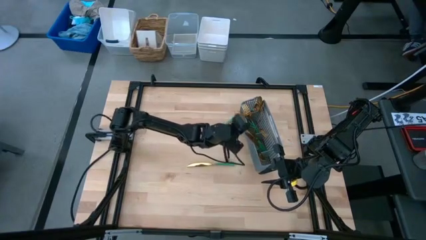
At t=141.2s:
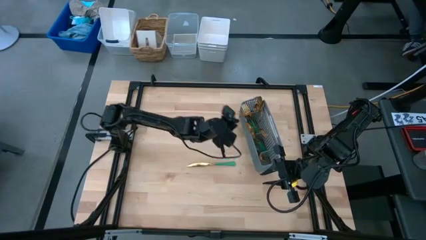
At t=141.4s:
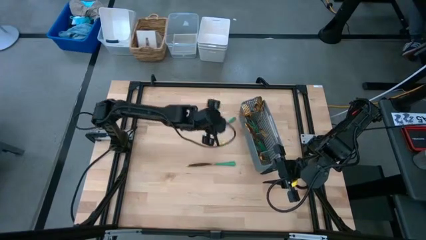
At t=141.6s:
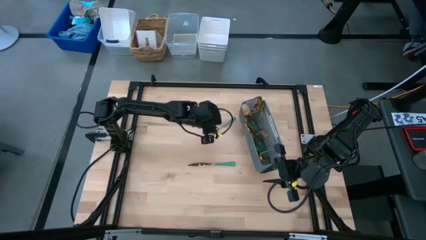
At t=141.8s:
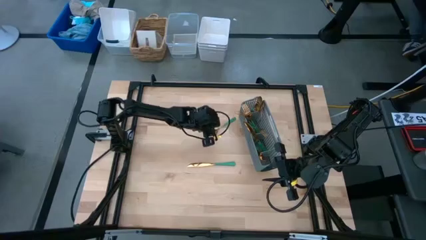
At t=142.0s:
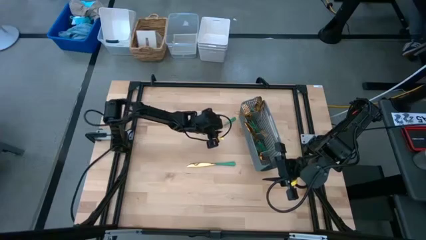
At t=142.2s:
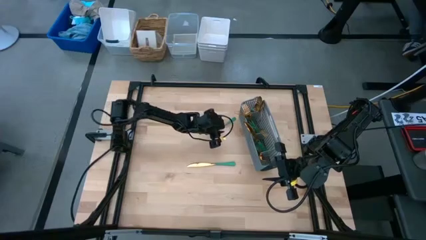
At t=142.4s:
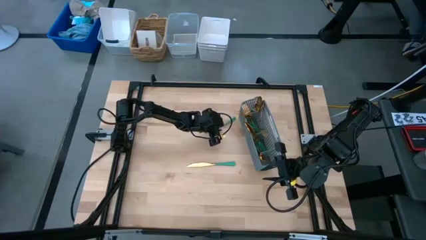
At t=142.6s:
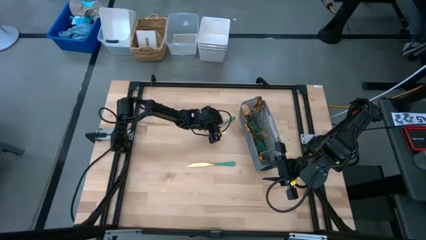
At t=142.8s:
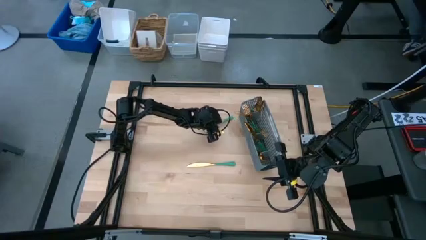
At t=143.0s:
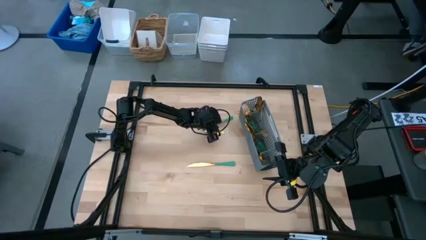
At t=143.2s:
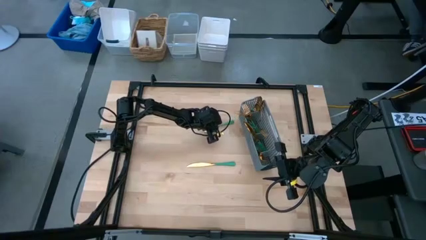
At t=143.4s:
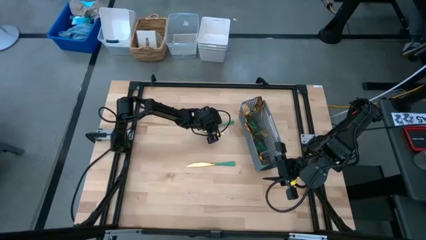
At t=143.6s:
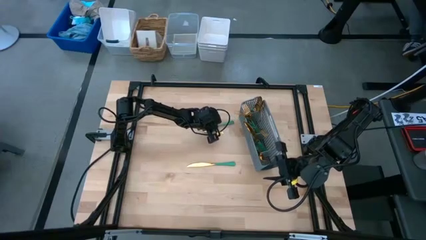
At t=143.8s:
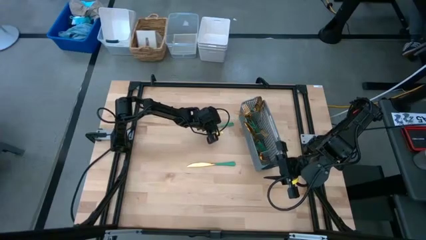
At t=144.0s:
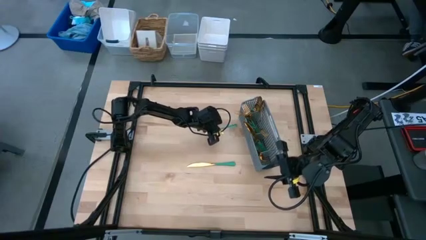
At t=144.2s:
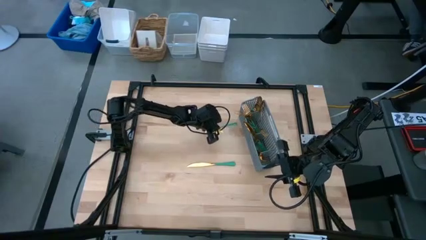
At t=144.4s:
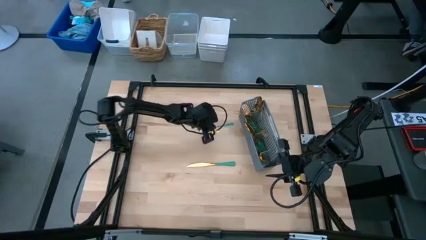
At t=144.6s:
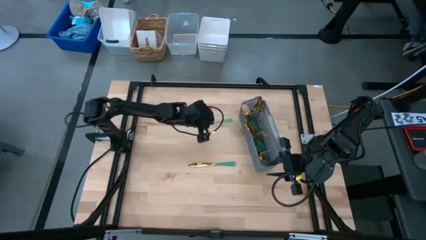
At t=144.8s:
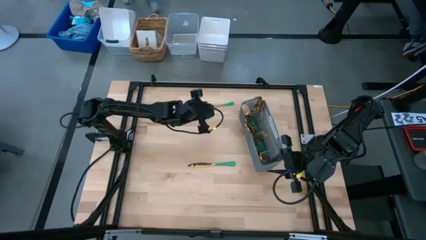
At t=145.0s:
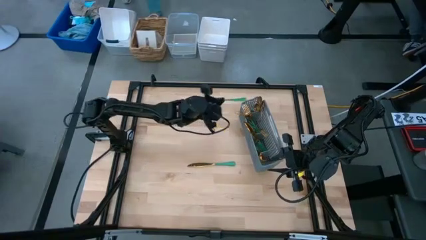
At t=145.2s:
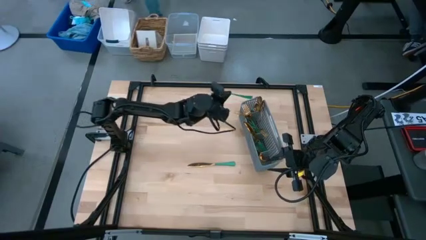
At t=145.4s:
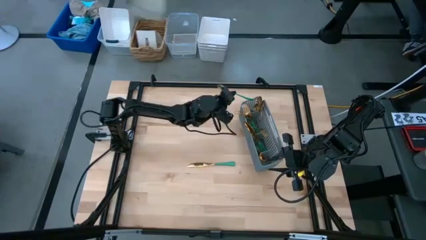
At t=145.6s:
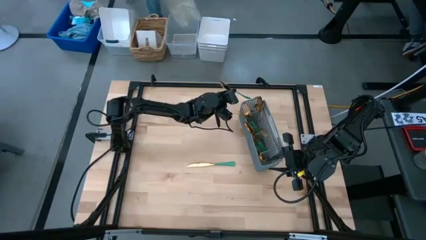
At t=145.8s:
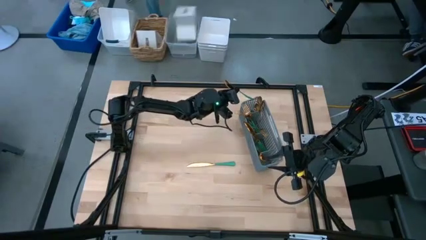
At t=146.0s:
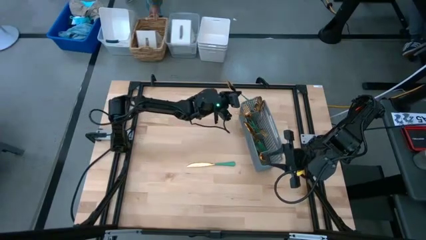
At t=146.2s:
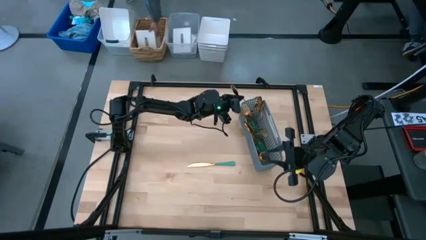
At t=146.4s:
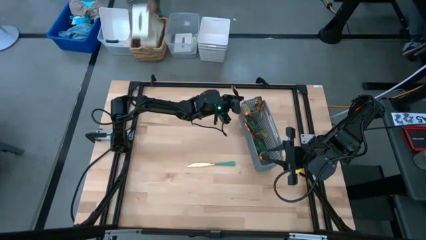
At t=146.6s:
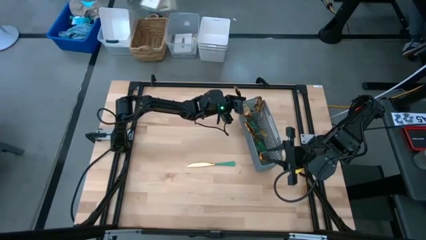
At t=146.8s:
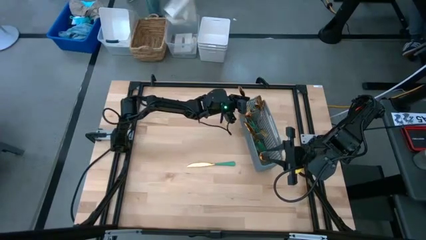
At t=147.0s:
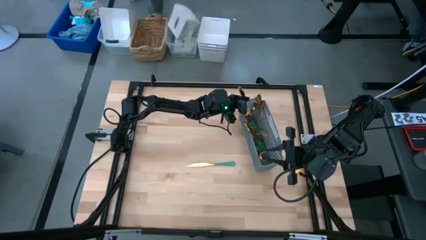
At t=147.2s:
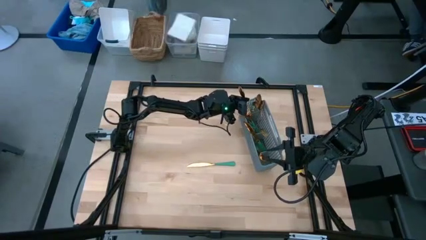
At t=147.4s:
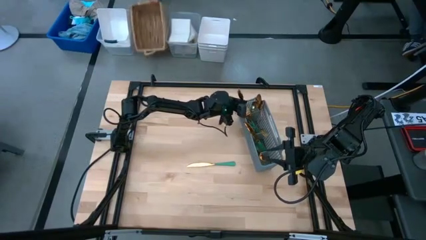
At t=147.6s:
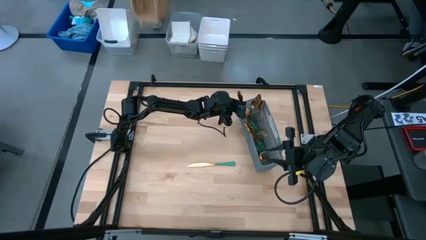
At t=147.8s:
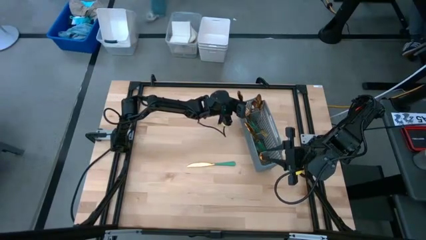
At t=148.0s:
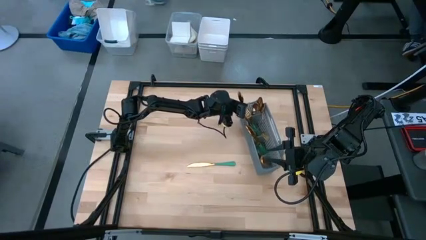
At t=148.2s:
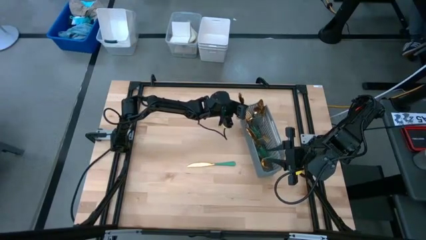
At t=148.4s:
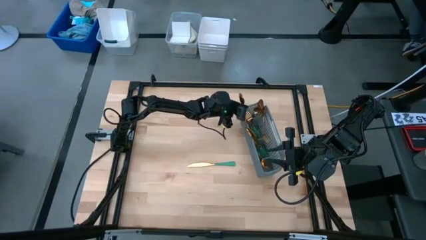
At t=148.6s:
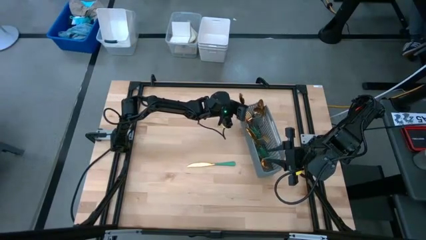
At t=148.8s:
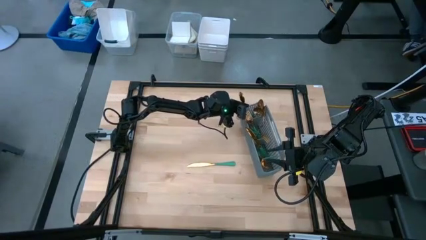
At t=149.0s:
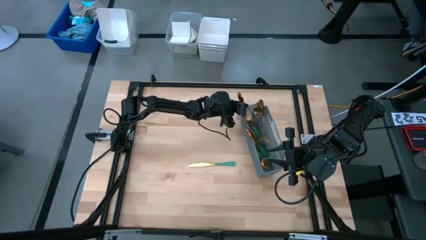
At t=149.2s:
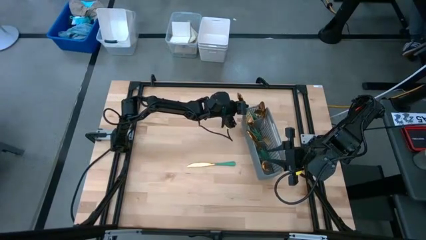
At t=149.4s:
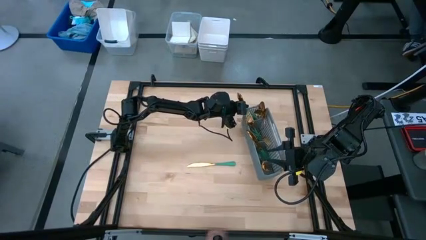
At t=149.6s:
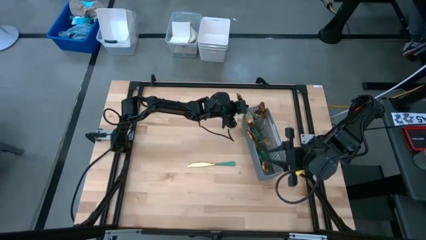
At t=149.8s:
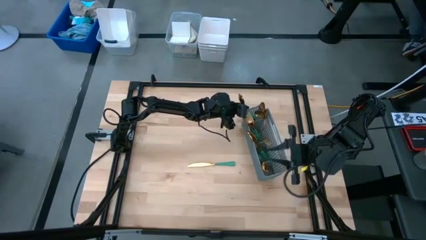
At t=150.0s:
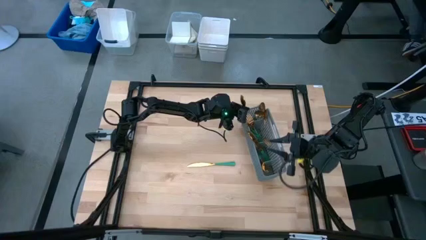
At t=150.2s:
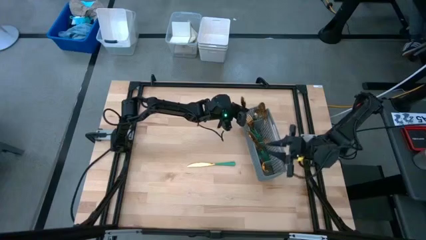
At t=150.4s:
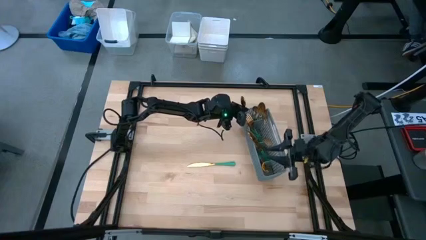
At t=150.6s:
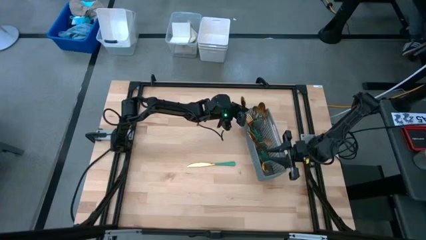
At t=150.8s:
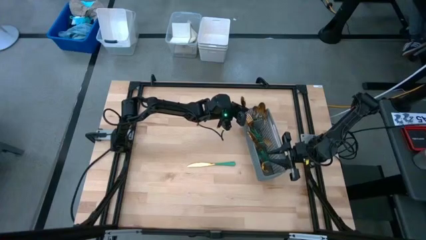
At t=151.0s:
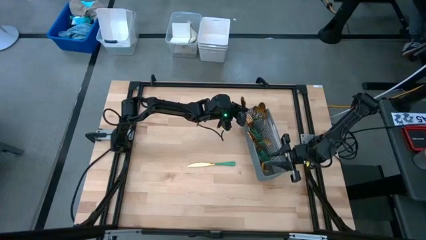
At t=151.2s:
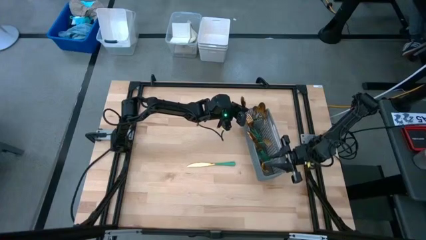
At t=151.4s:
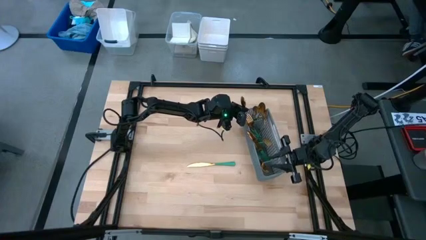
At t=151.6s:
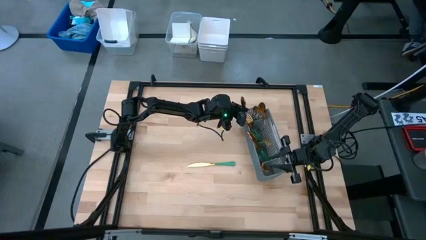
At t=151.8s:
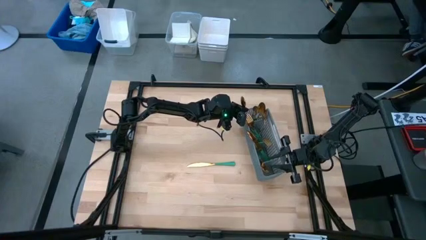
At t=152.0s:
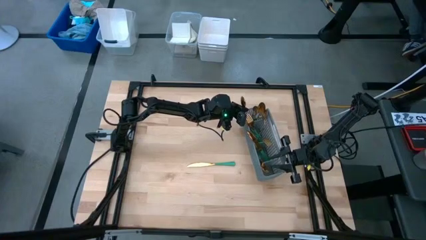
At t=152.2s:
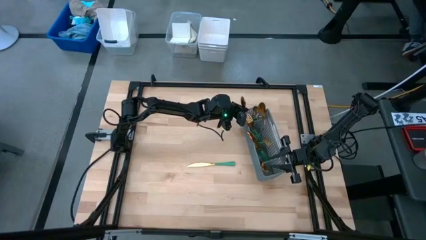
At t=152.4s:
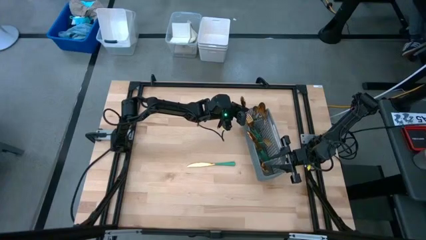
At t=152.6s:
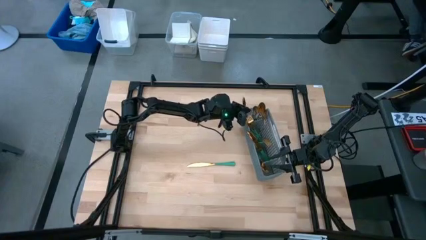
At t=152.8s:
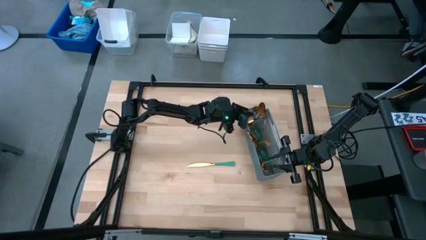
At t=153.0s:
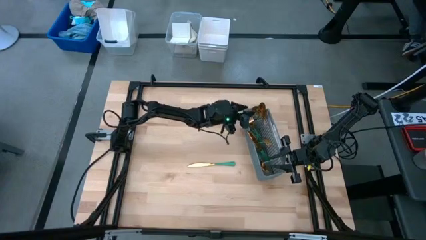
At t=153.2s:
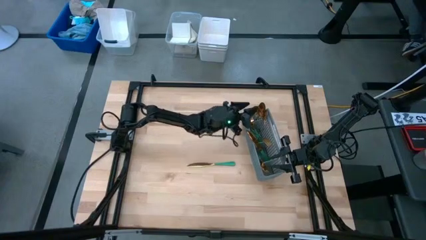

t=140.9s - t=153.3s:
Task: Sort silverware
Put the spoon into the top section of the basket

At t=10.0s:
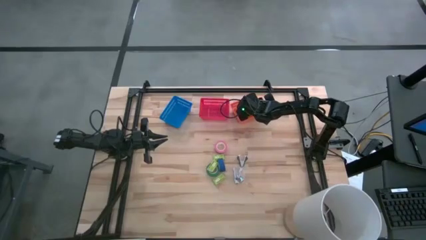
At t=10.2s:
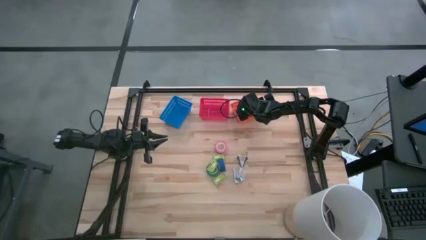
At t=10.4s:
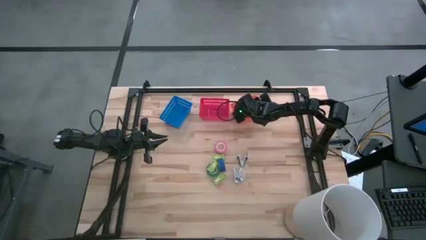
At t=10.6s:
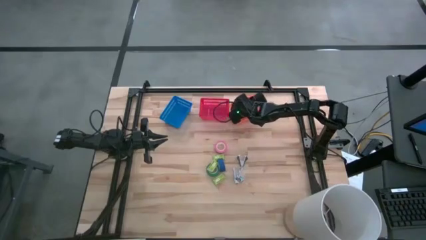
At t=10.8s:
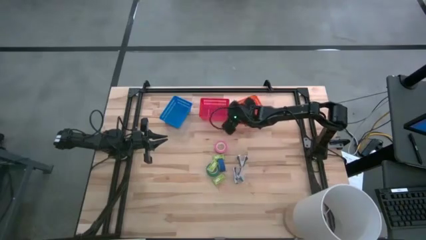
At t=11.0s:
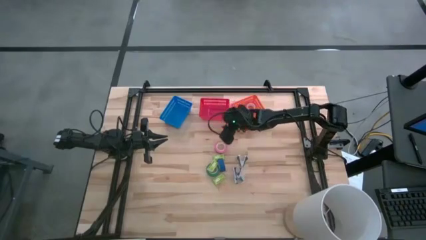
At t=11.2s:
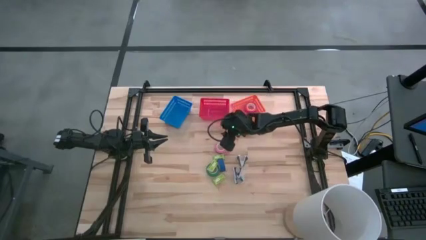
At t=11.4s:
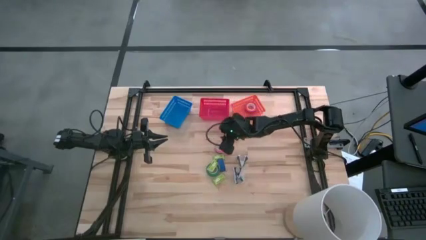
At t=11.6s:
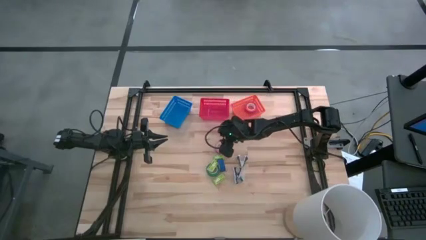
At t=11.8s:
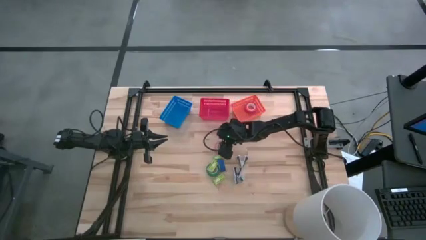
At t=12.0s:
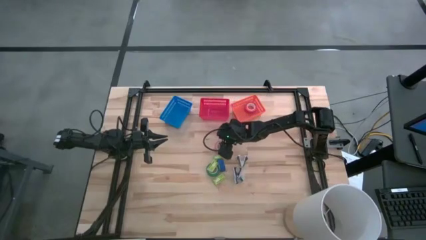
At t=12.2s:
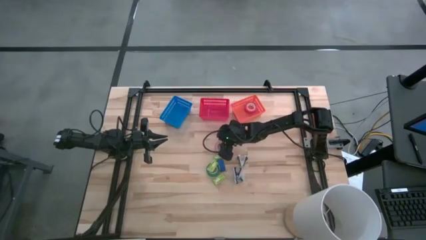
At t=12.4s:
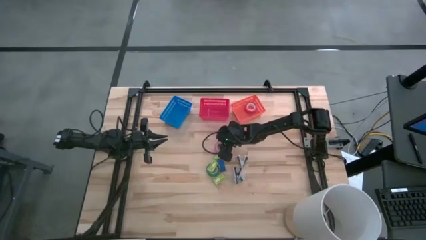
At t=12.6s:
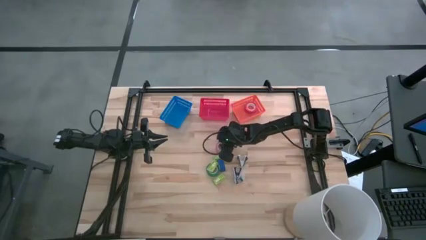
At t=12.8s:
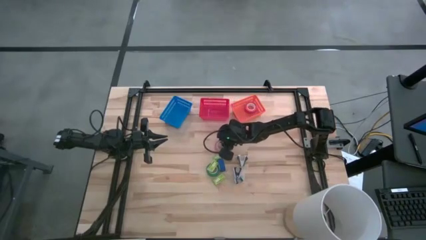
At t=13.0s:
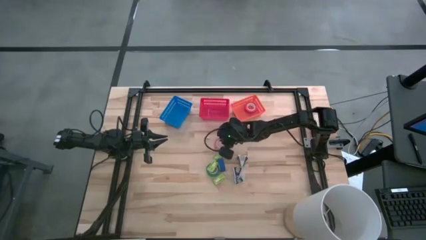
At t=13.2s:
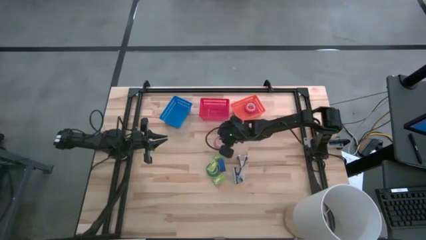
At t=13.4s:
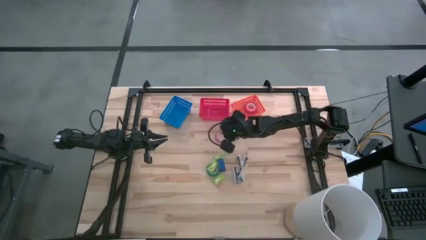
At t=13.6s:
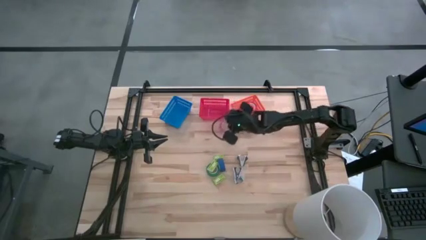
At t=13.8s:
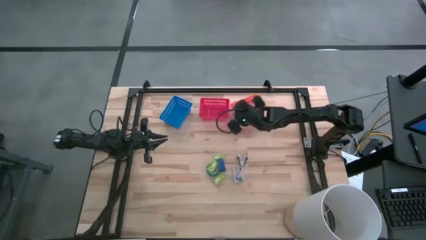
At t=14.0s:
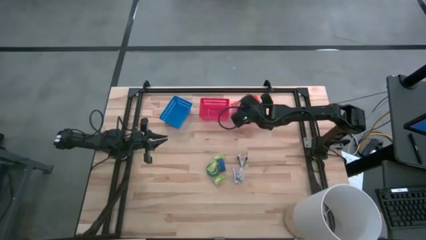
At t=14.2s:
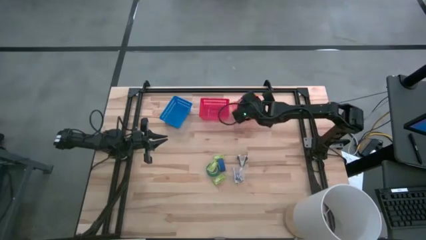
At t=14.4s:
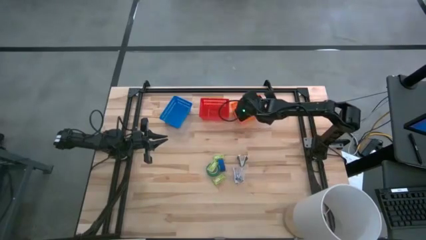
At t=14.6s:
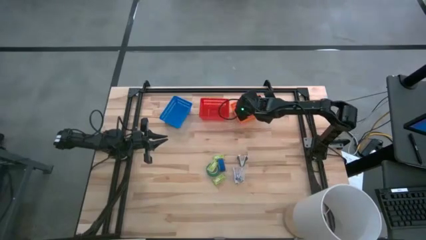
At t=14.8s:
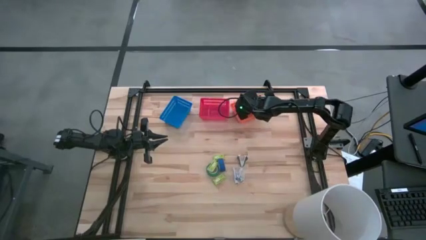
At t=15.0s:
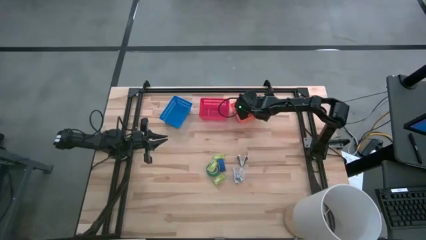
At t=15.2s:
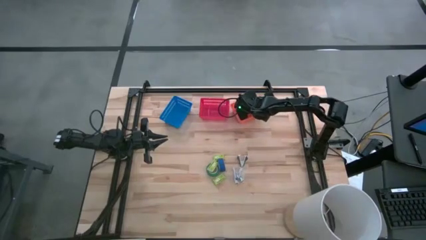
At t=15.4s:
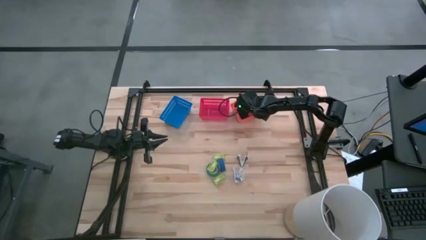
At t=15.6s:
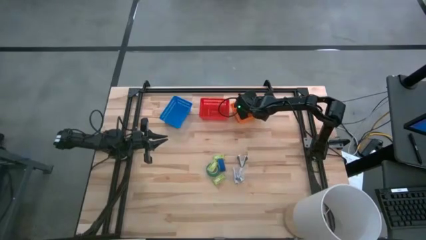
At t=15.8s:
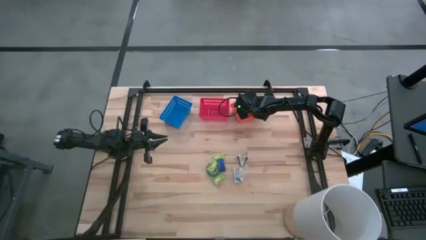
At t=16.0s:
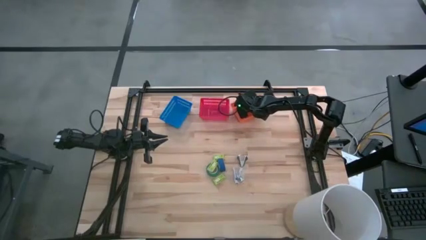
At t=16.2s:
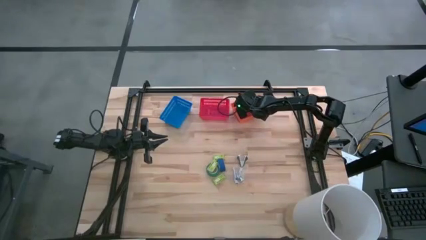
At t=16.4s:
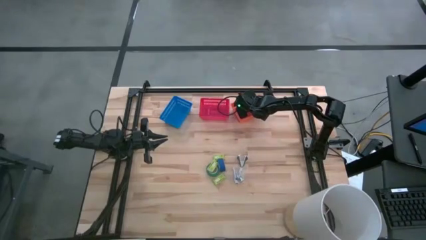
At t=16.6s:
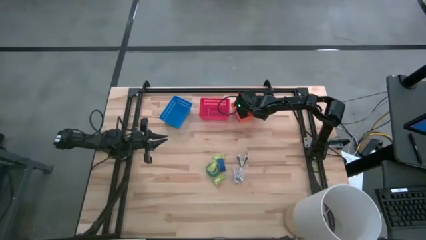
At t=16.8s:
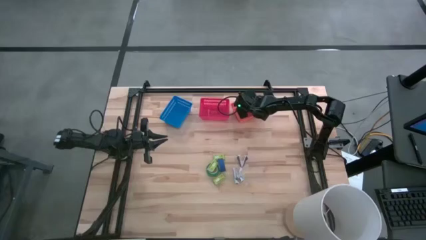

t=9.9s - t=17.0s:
Task: Pick and place Stapler, Stapler remover, tape
Put the pink tape into the orange bin
